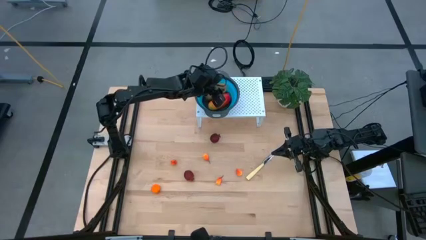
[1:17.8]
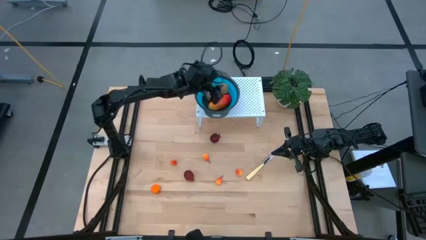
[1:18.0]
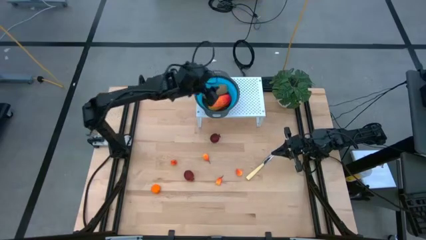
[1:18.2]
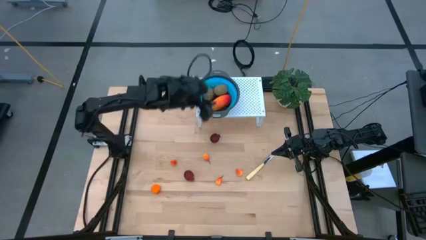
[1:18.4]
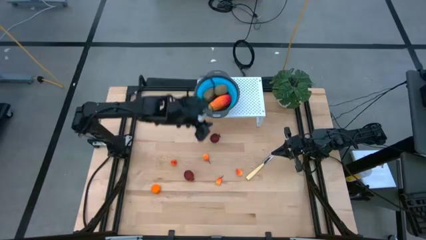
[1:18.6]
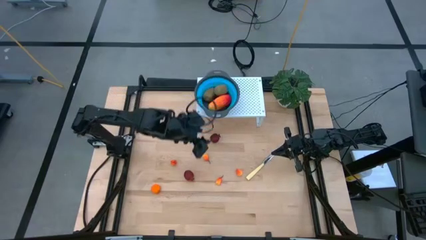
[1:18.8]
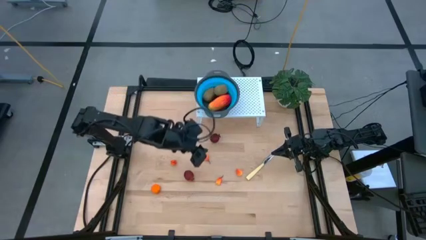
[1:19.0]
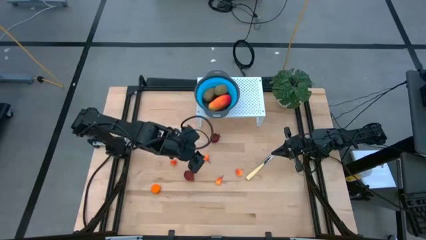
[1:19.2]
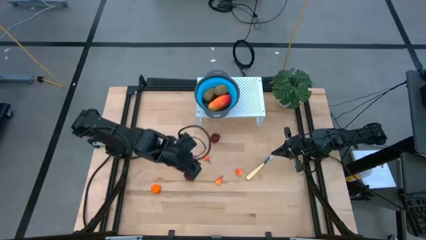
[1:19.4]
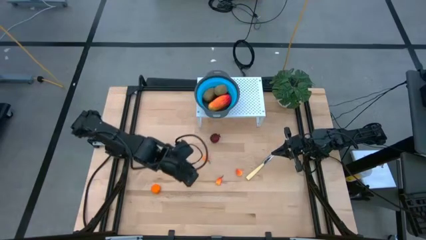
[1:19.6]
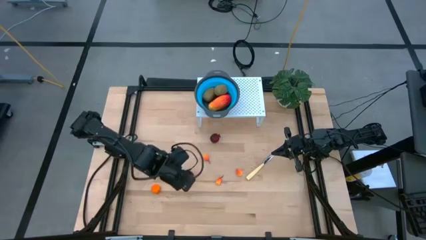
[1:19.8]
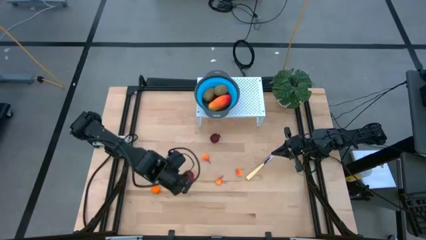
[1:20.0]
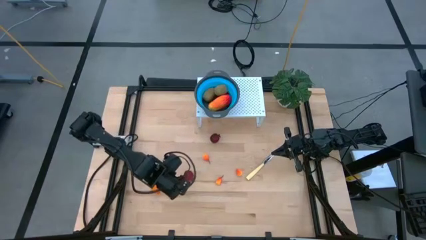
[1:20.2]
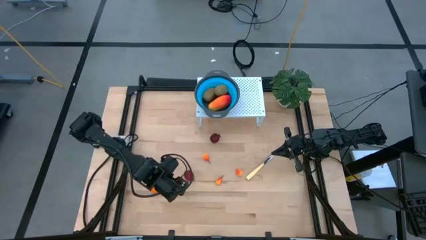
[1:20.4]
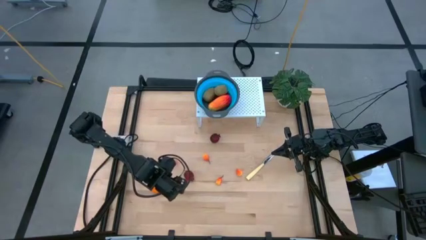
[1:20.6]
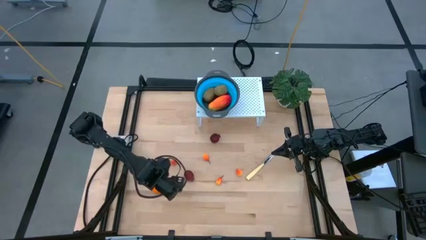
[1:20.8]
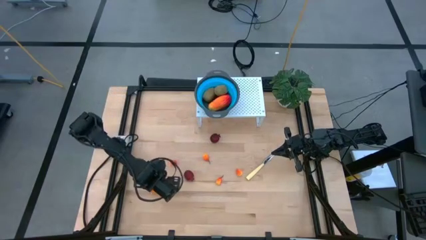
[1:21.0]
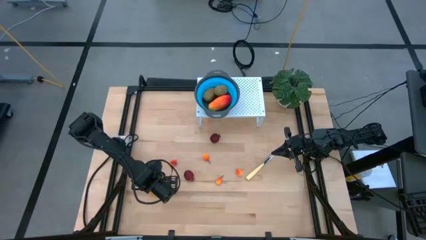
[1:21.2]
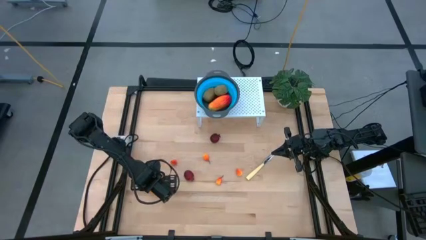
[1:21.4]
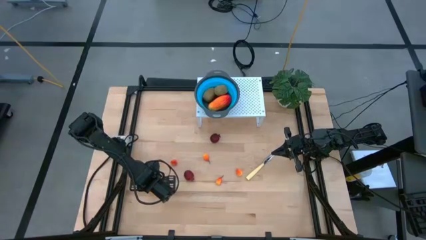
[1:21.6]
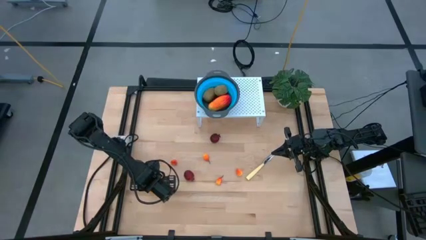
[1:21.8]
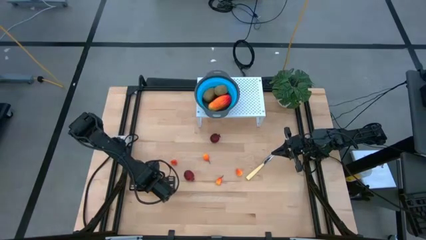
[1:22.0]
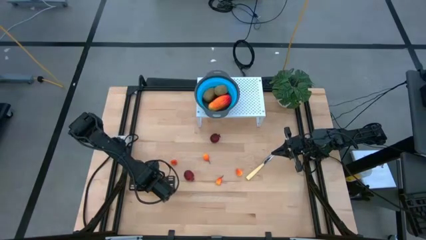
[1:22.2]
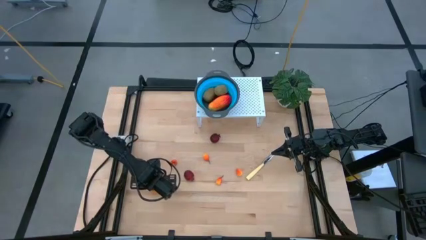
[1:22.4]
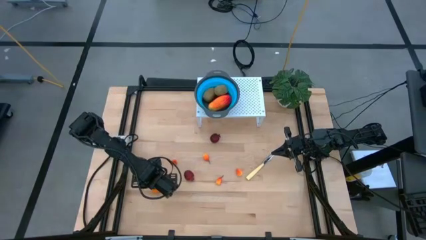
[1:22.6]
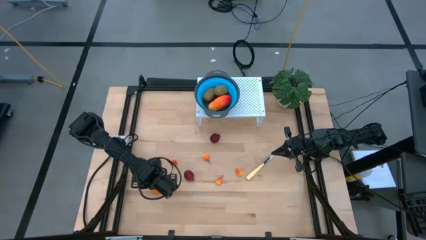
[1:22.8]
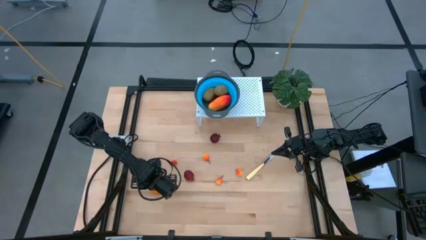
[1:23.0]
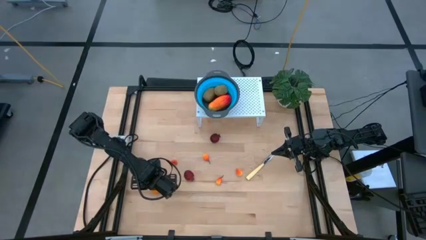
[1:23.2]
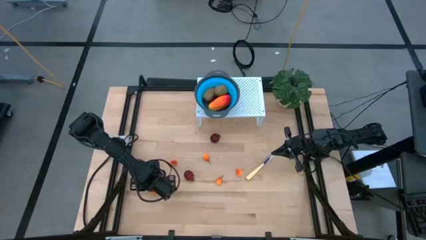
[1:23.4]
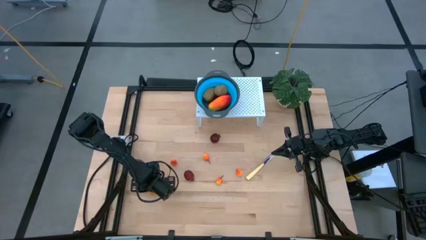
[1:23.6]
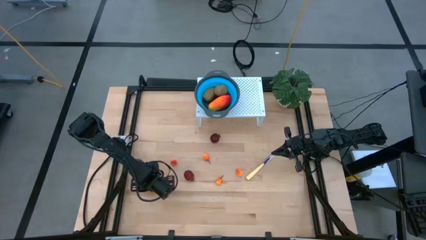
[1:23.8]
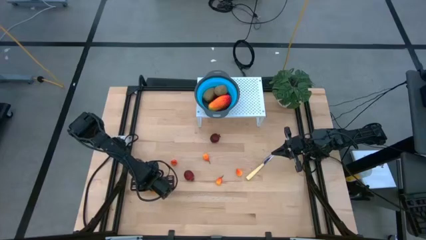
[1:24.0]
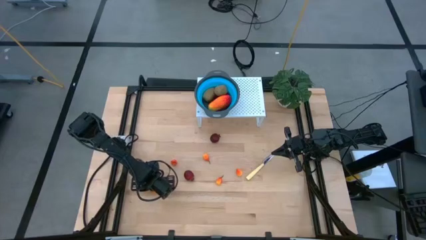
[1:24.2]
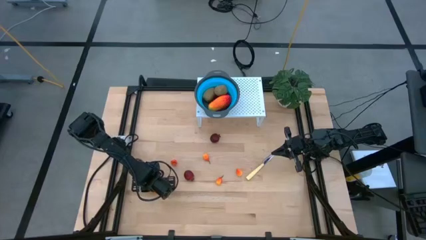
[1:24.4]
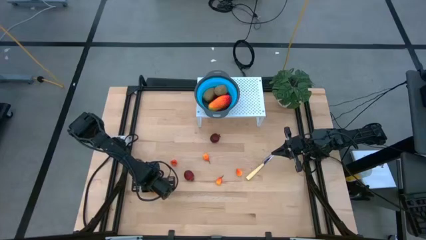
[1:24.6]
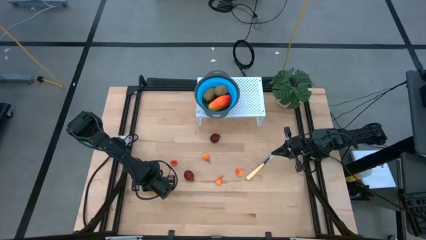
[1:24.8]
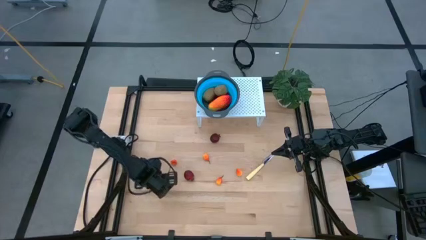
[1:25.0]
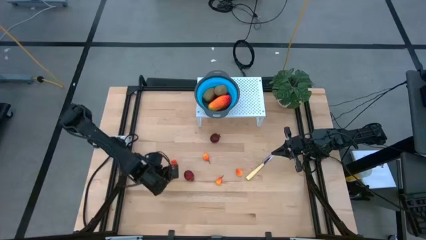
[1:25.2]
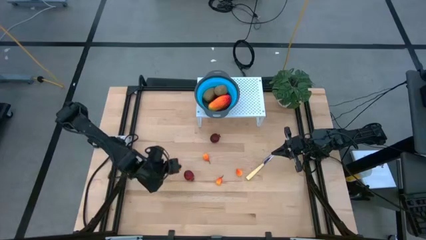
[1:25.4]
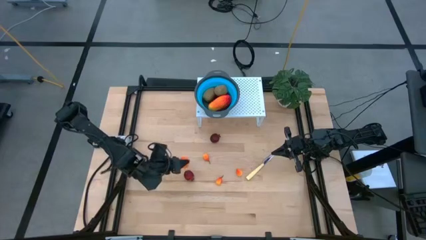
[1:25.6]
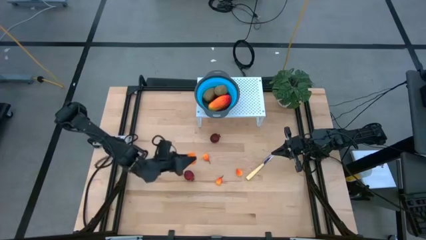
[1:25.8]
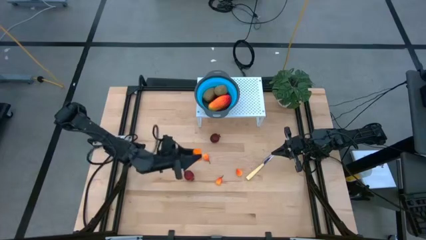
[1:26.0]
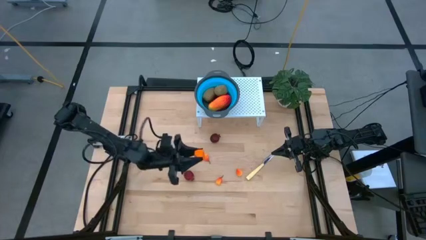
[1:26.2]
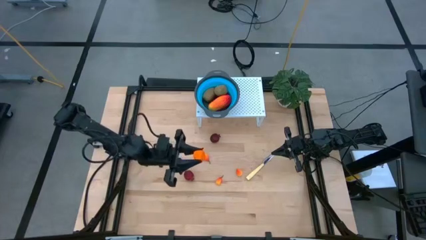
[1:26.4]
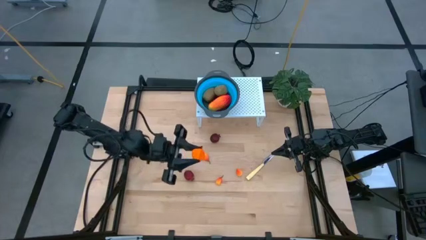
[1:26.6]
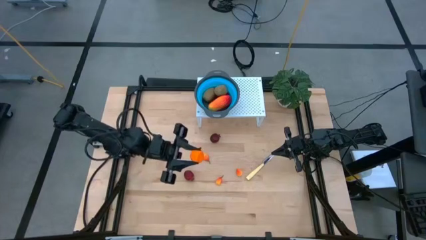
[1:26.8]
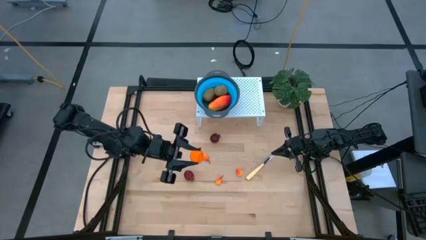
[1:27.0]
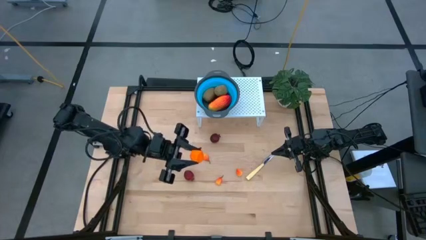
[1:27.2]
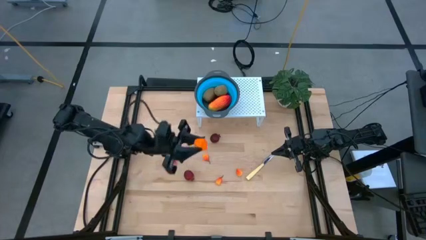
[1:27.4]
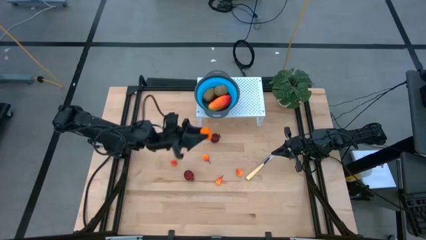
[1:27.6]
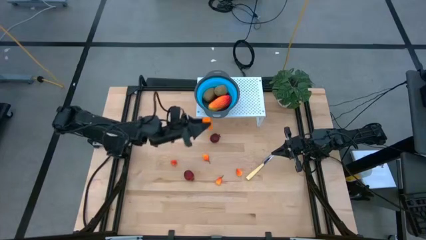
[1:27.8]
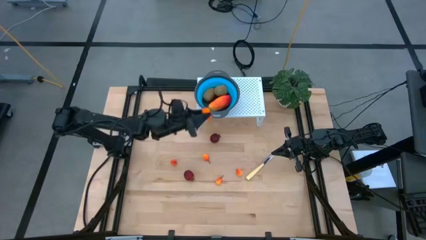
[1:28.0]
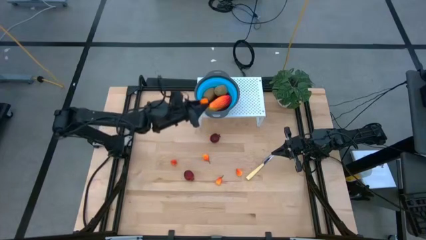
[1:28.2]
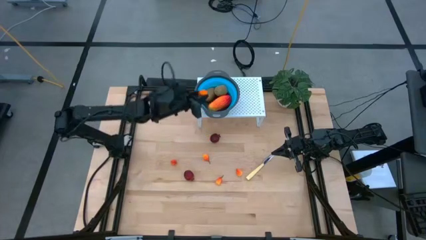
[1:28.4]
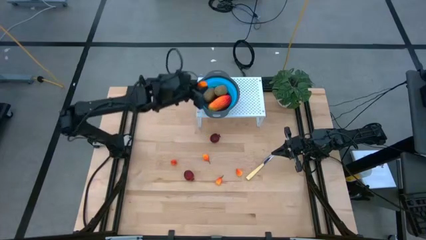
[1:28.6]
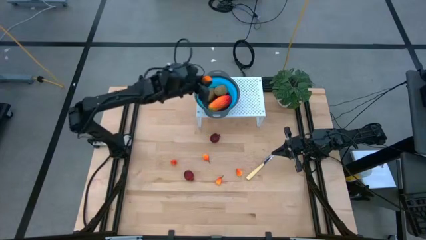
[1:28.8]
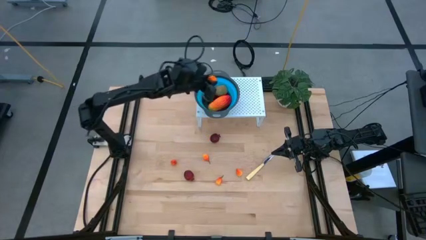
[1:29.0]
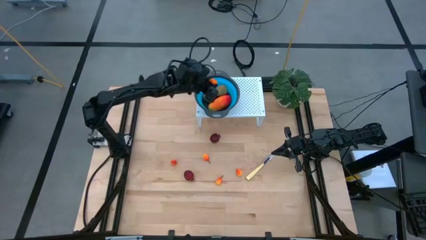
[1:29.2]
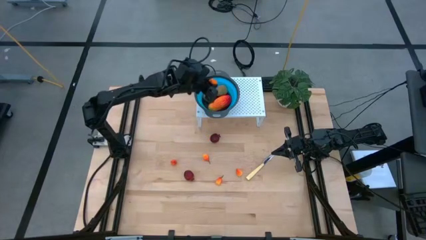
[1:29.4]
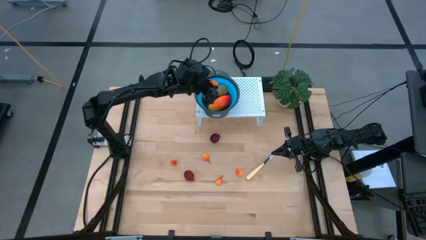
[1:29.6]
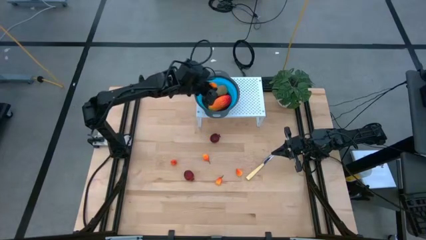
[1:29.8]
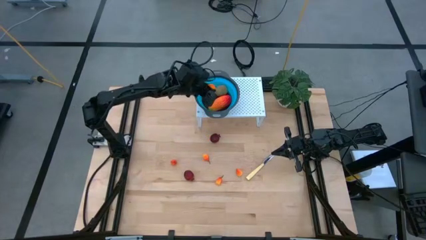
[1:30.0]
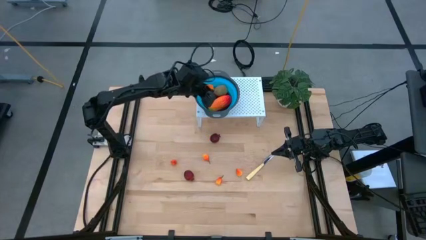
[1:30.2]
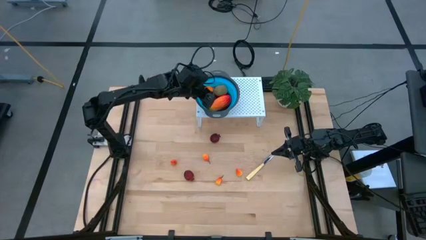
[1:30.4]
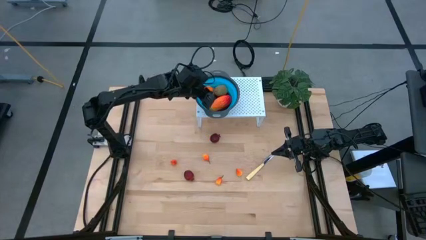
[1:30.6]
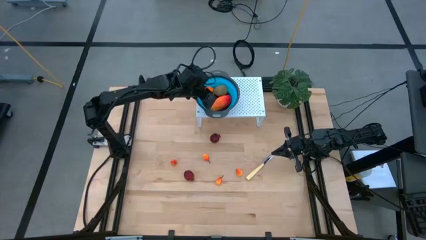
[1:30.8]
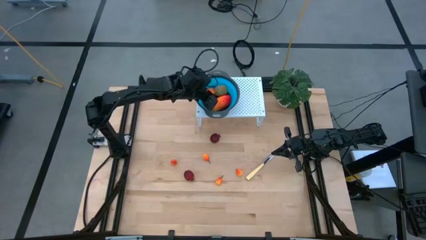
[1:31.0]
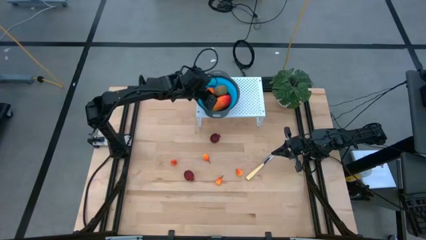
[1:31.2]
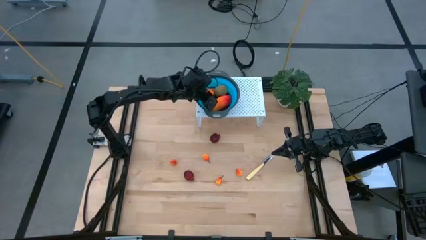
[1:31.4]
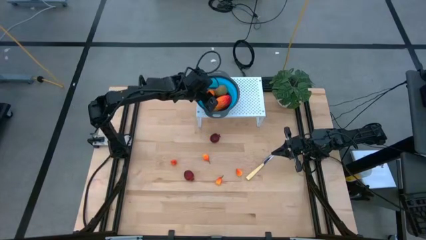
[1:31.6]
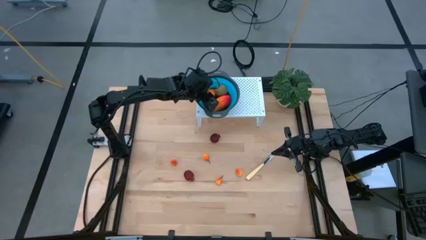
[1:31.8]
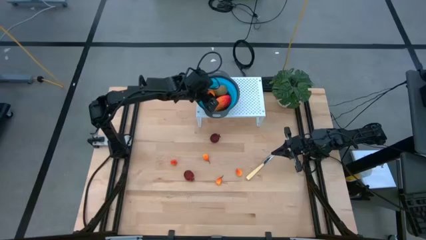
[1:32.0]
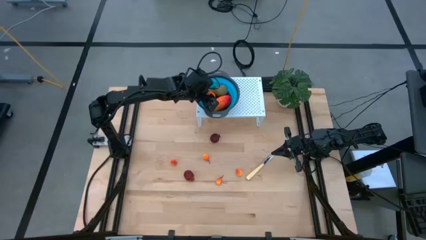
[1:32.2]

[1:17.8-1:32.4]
Task: Pick & Place Fruit
Put the orange into the blue strainer bowl on the shelf
